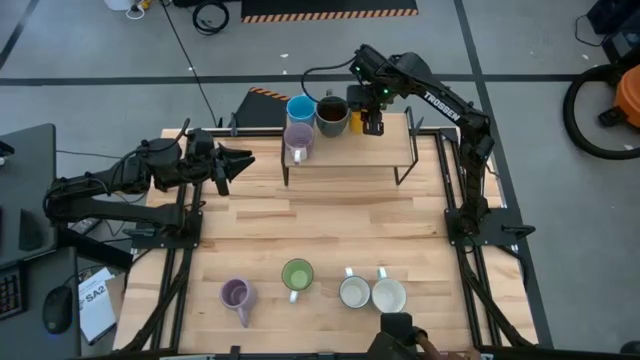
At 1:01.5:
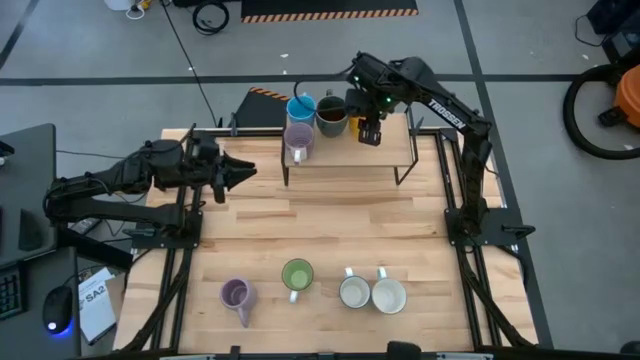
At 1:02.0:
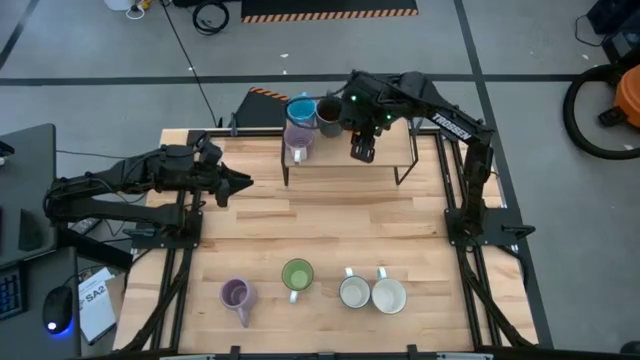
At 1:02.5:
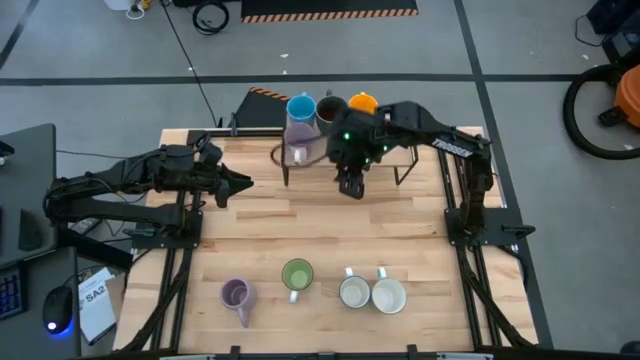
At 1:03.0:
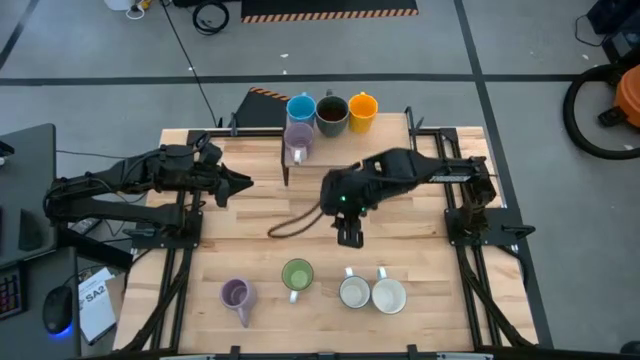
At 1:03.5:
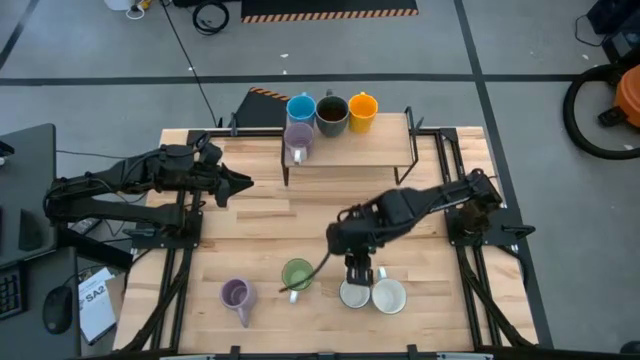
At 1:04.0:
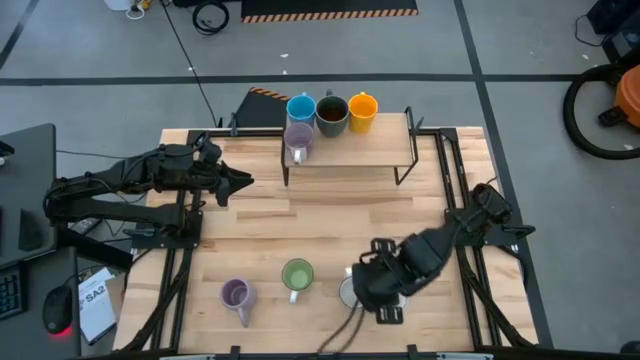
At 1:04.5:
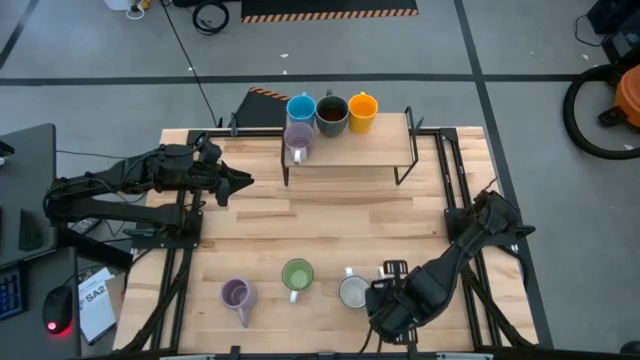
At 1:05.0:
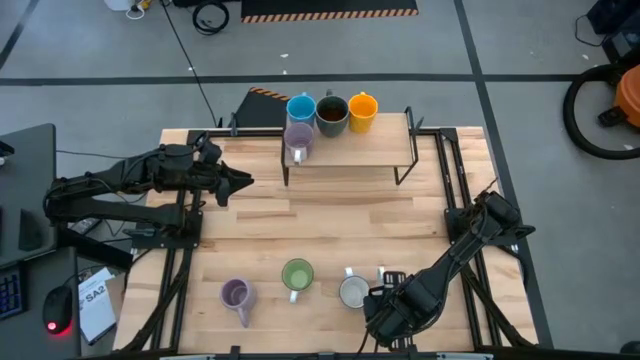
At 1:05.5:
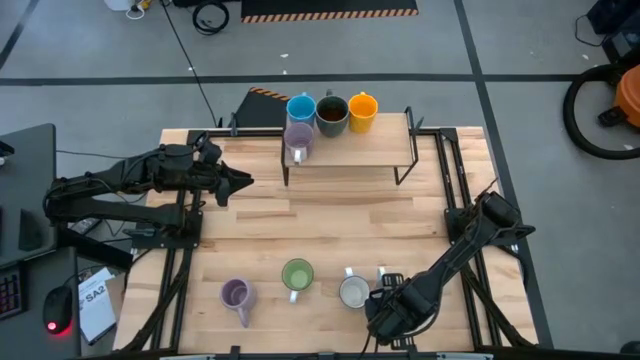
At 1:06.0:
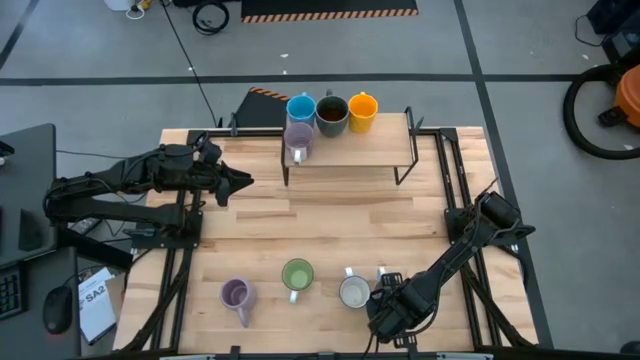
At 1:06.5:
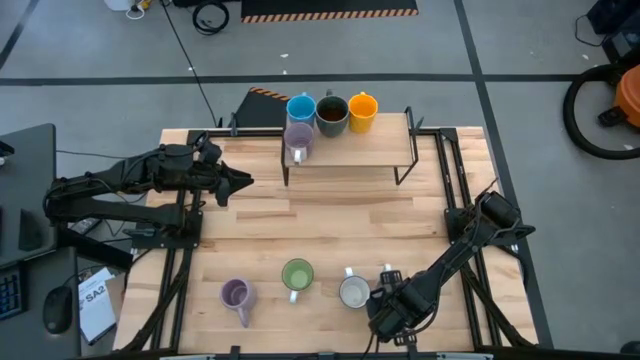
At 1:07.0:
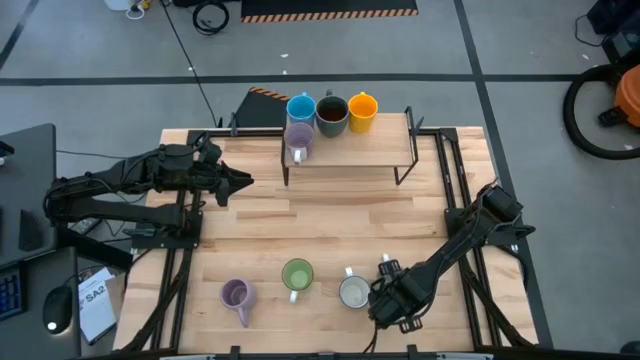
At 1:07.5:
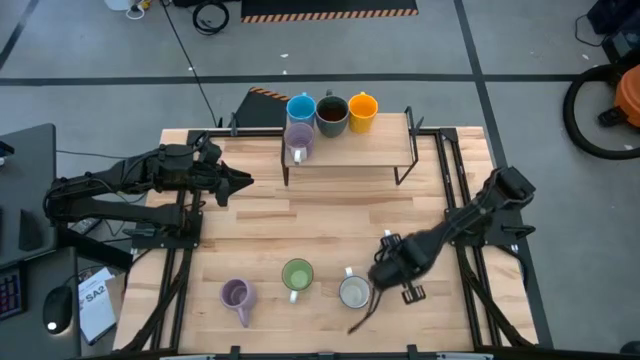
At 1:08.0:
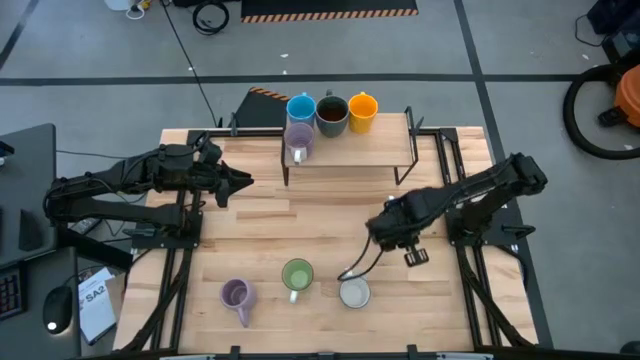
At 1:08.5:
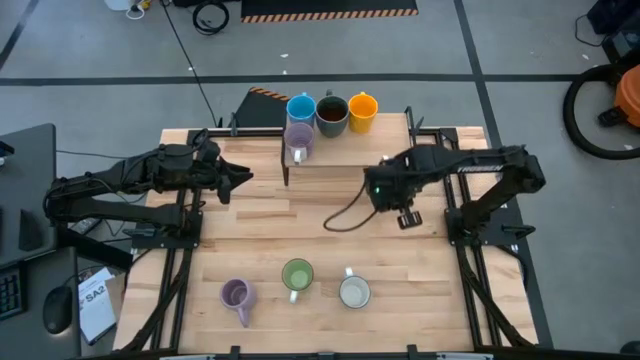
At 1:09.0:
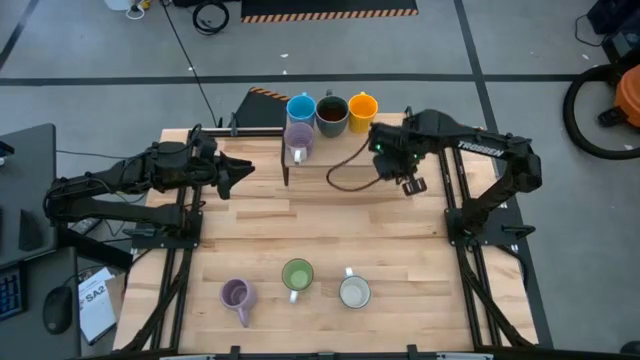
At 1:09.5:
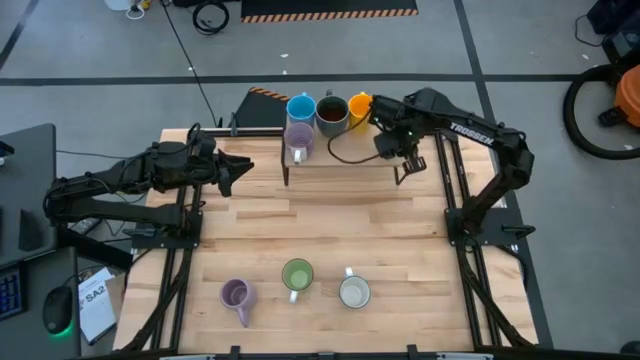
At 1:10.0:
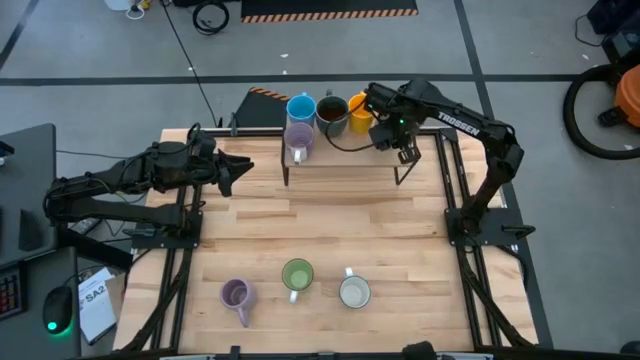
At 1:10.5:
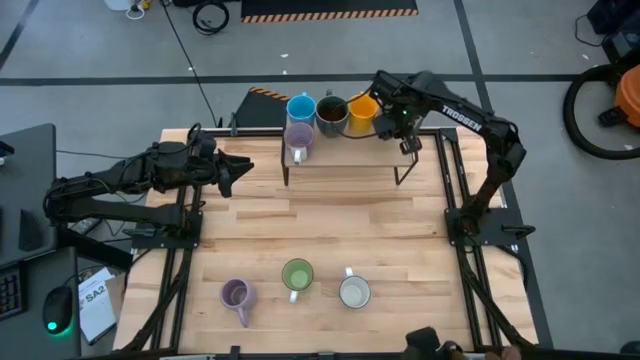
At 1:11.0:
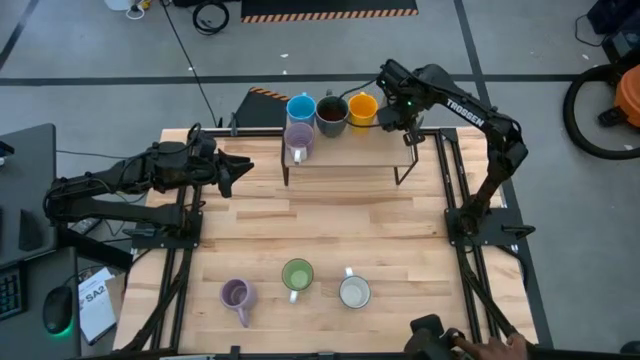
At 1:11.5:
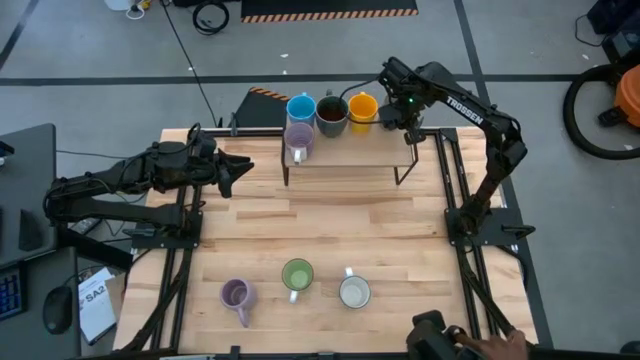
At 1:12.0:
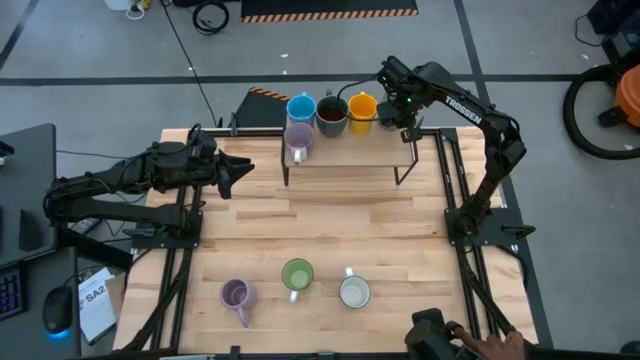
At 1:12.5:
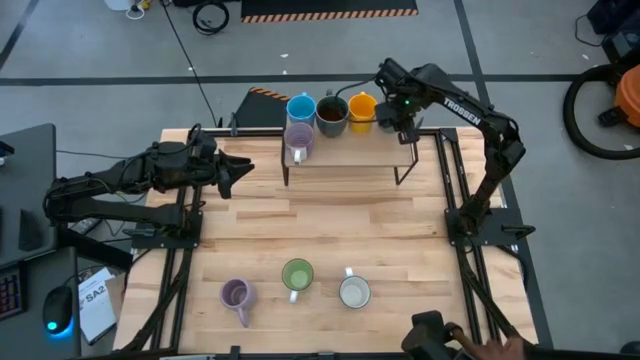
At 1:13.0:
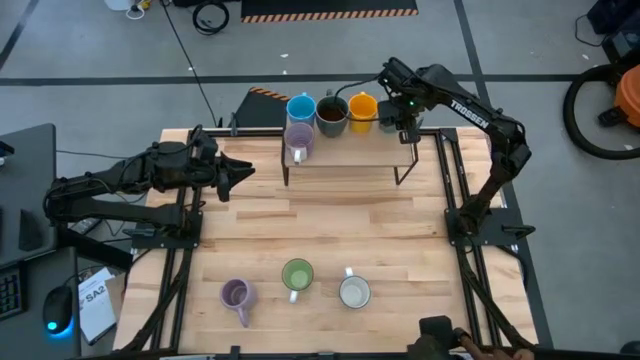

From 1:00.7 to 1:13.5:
Task: Place coffee mugs
Put the light blue mug on the shelf

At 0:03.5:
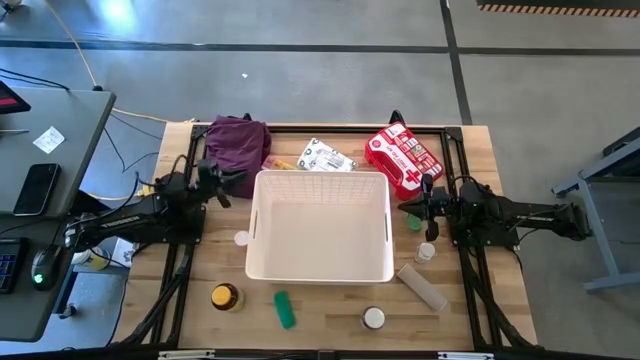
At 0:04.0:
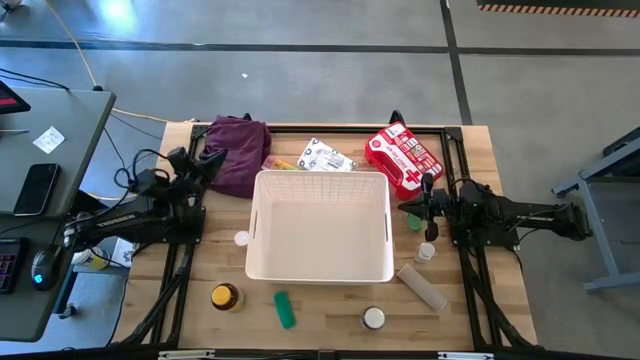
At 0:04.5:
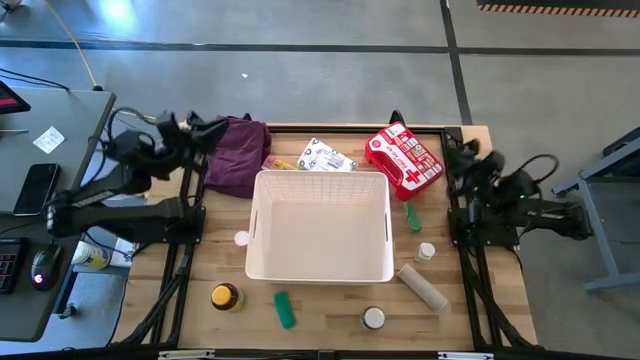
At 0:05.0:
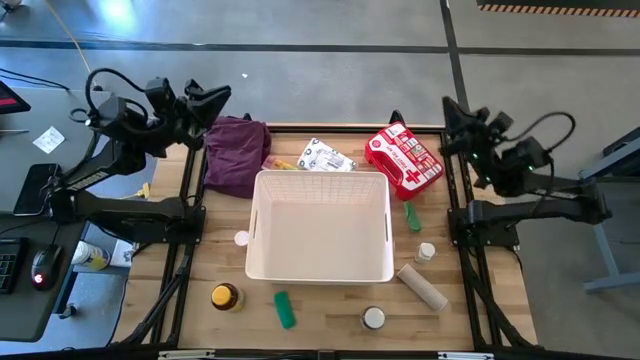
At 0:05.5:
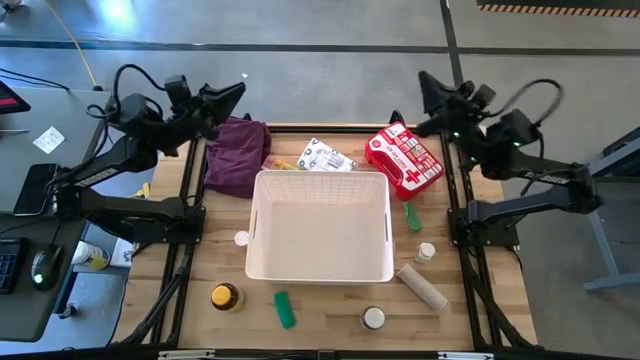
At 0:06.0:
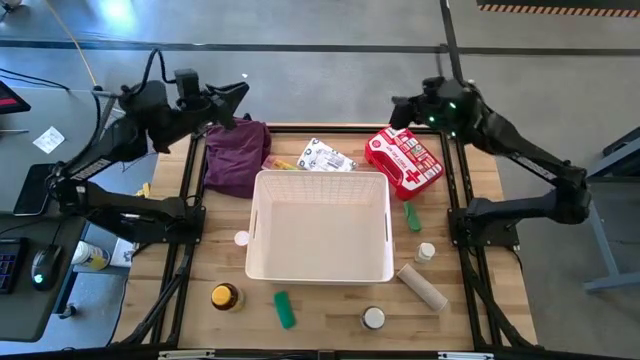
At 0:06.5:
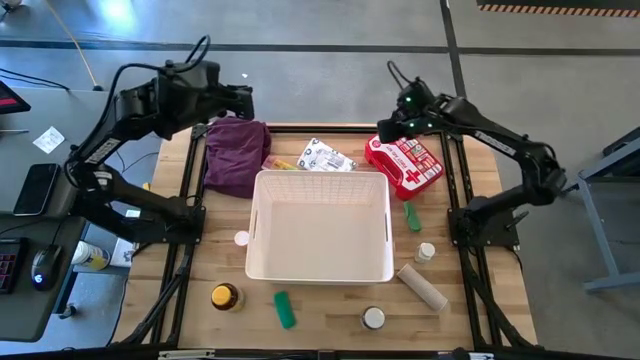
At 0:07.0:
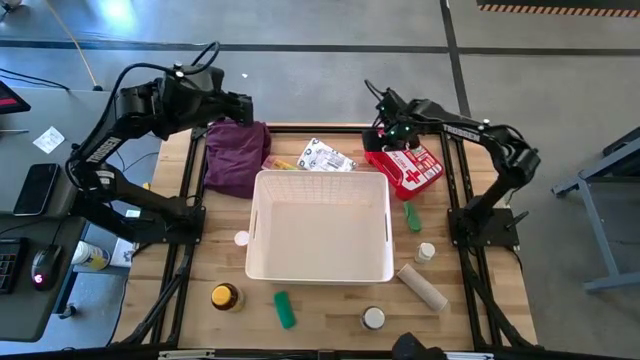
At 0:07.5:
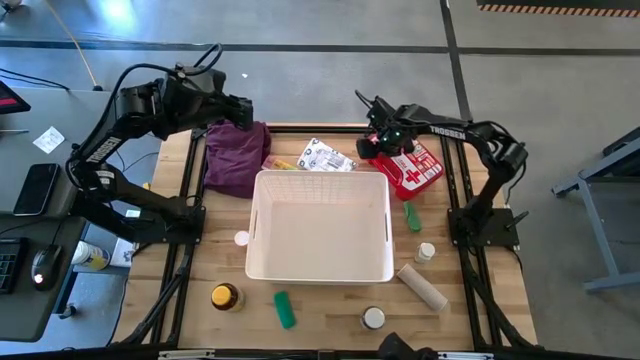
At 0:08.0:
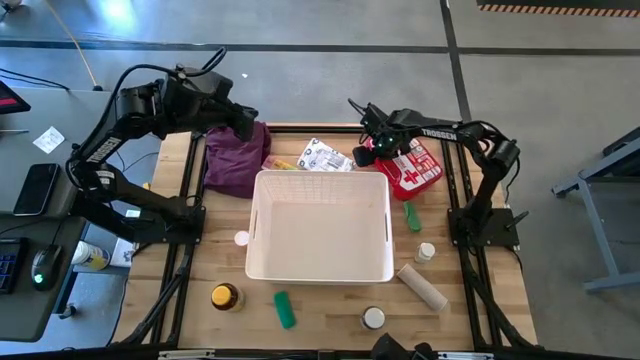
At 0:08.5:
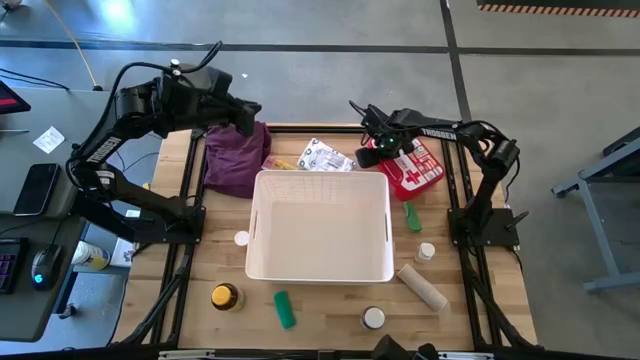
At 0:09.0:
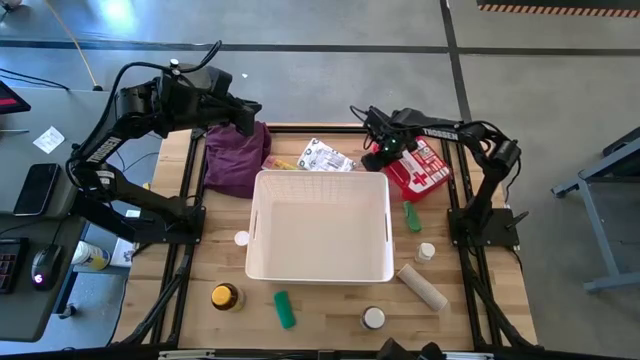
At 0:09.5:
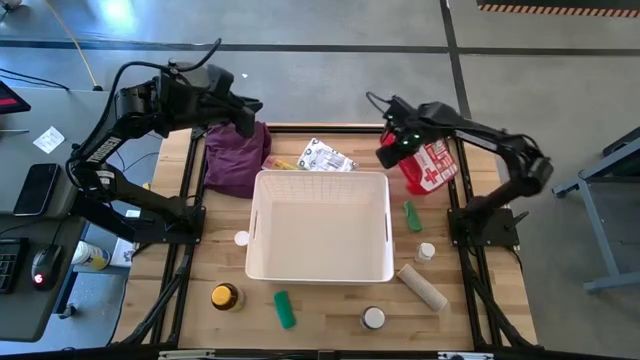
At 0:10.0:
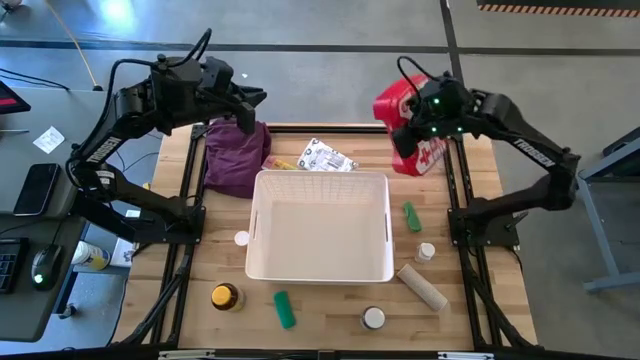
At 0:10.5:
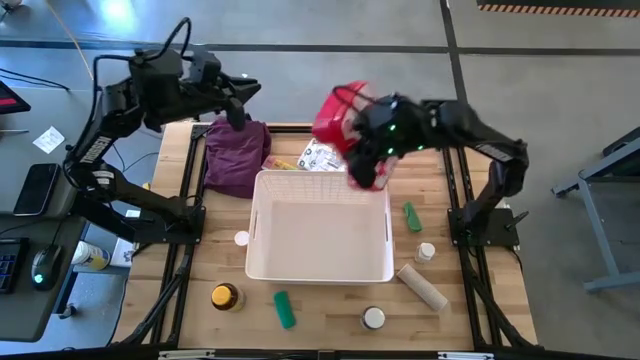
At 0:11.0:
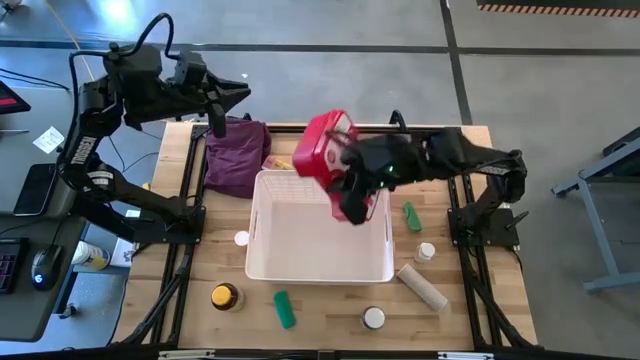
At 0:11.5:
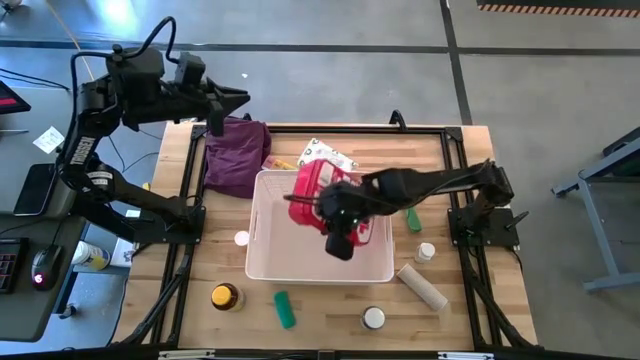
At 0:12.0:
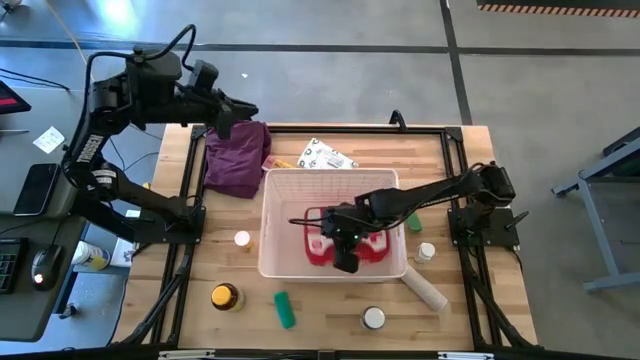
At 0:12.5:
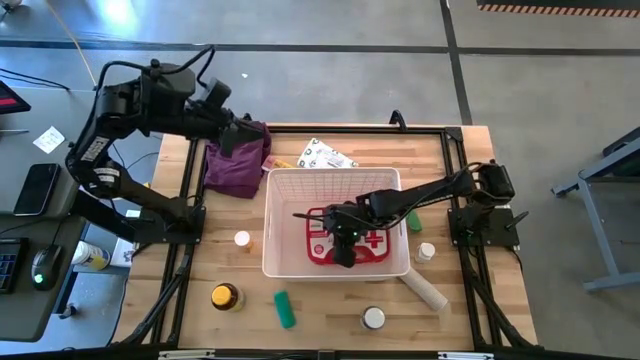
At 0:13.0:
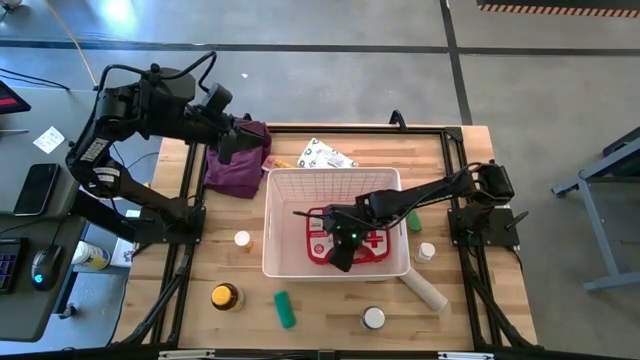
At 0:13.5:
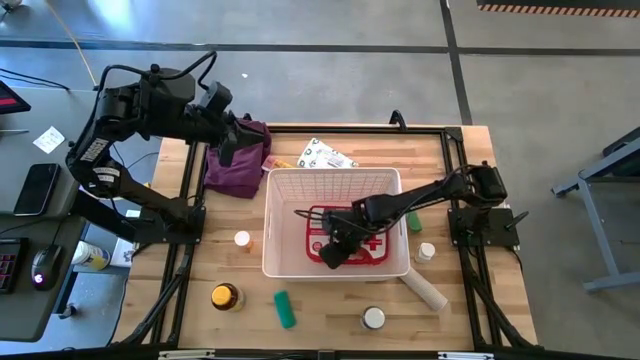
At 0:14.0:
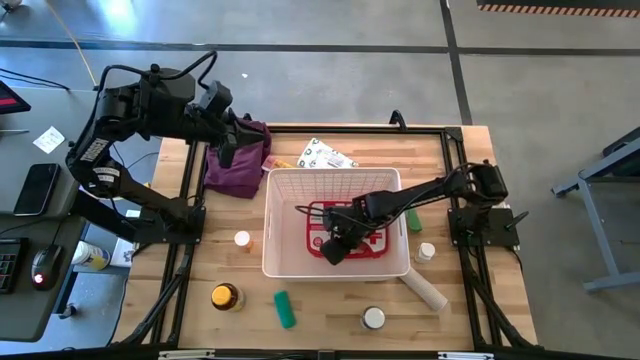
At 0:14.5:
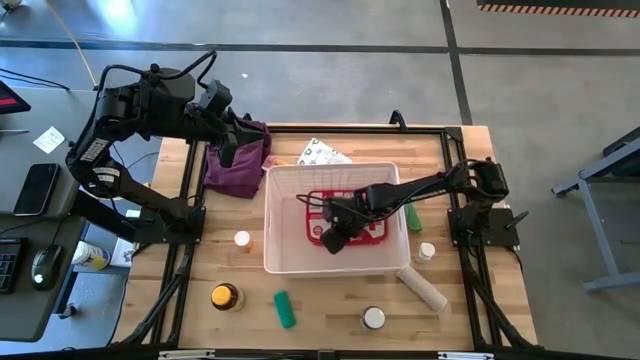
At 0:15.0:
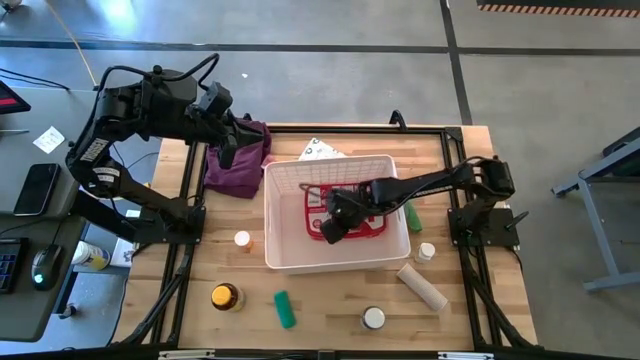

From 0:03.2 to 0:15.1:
Task: Pick & place medical supplies in basket/bin
Put the red first aid kit into the white bin
